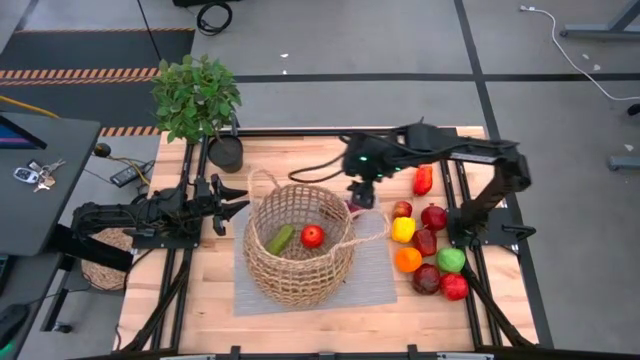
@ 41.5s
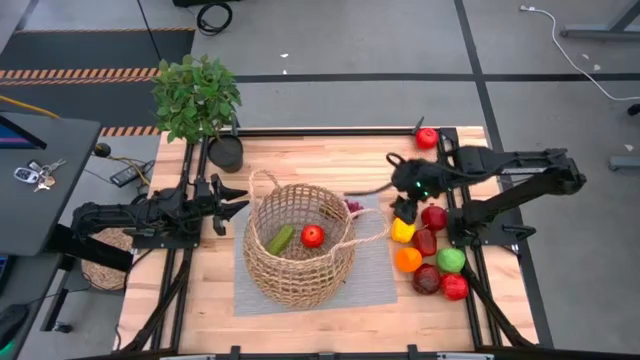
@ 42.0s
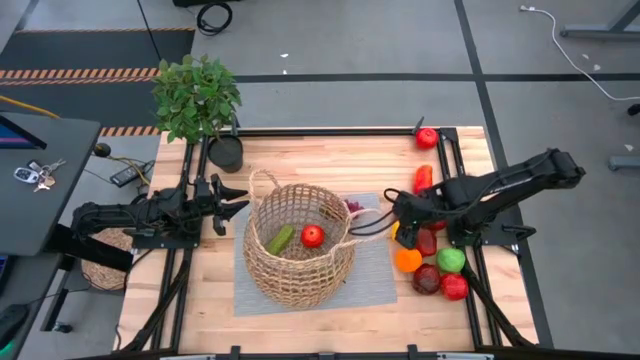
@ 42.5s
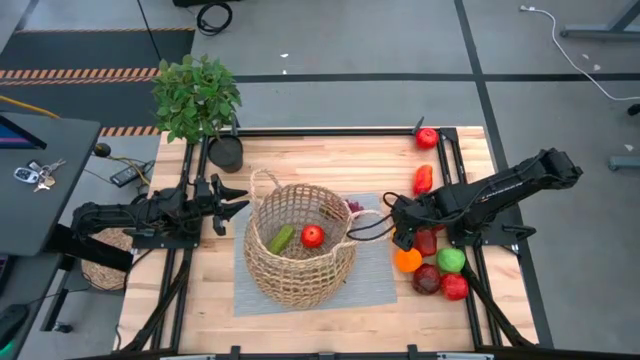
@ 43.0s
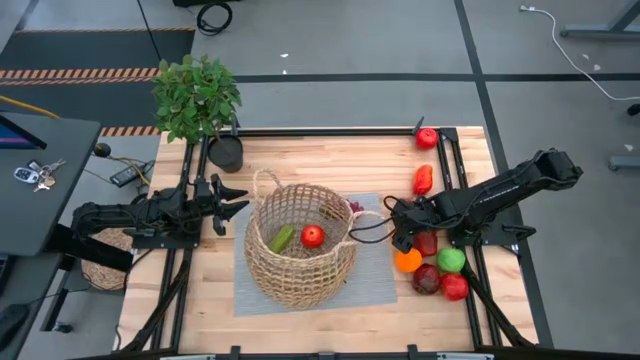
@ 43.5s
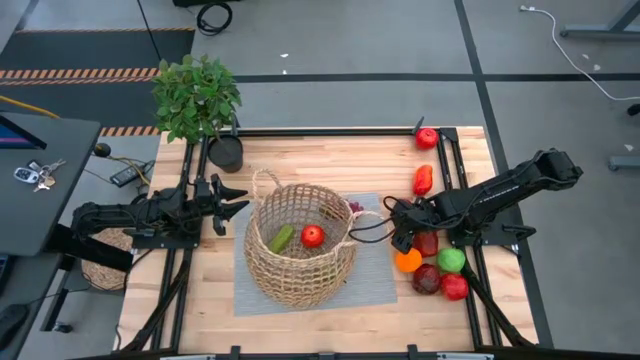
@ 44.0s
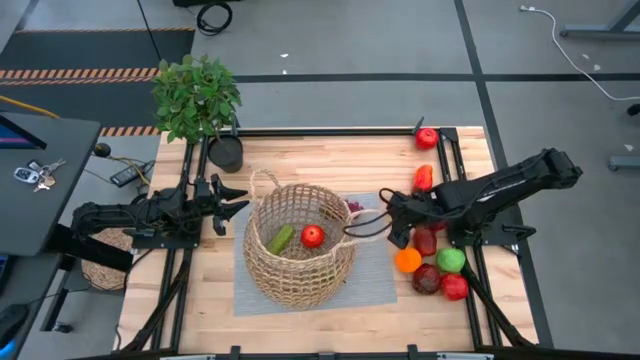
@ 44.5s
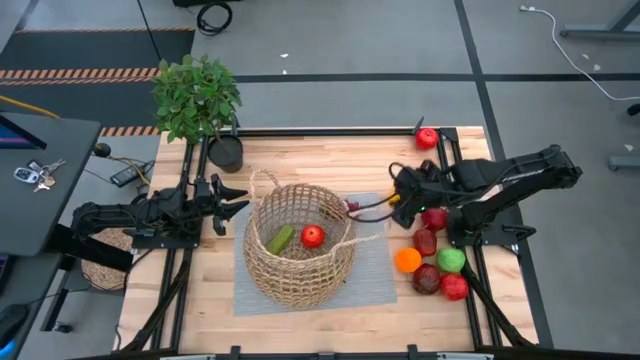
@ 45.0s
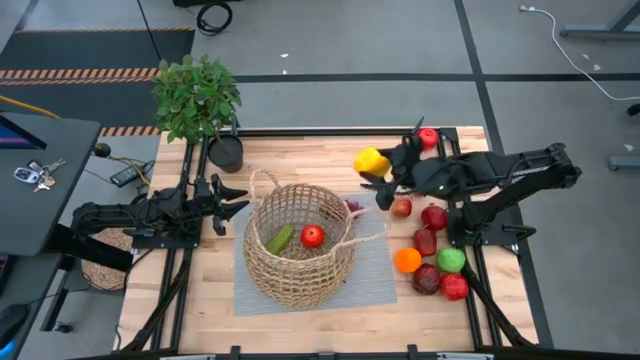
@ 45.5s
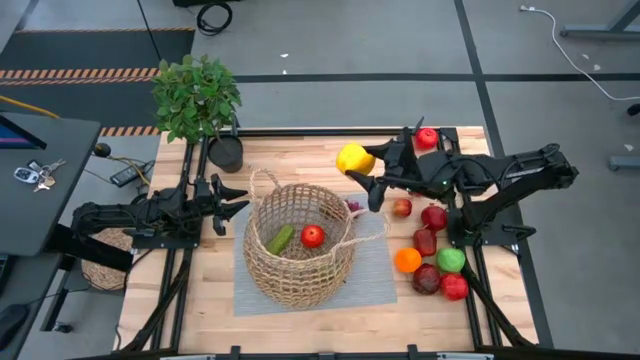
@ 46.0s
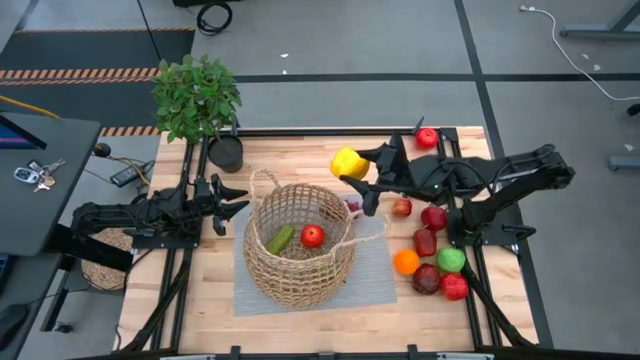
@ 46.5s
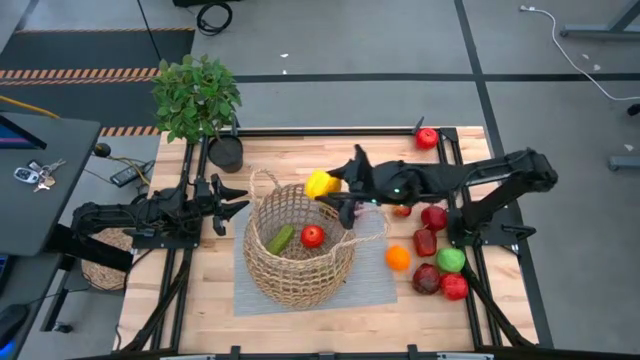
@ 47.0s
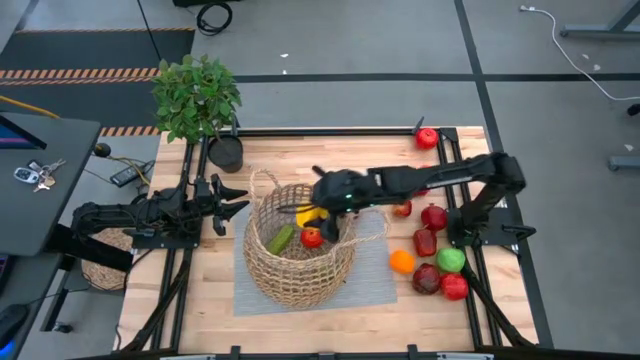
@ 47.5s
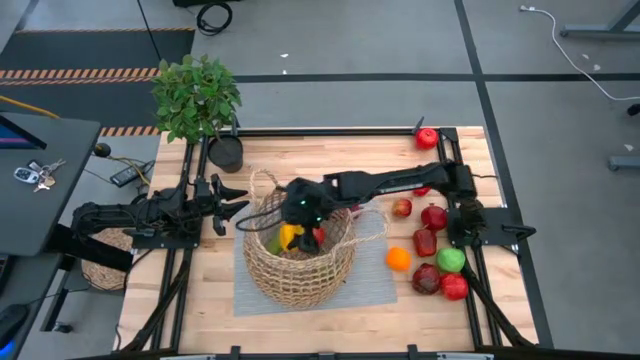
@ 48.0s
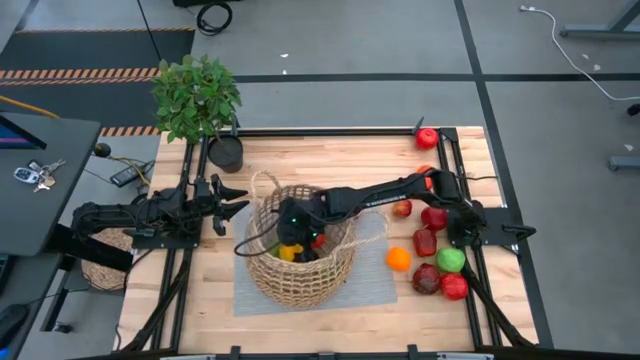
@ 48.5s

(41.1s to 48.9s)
Task: Build produce basket
Put the yellow bell pepper into the basket

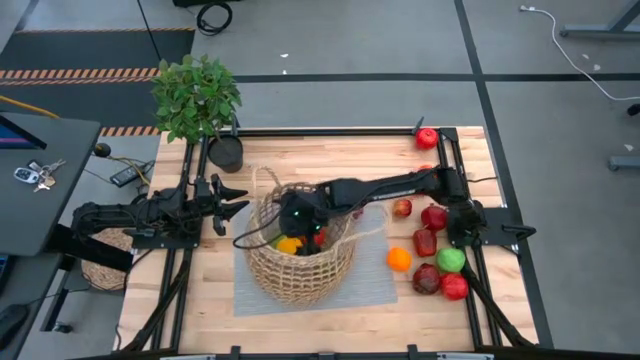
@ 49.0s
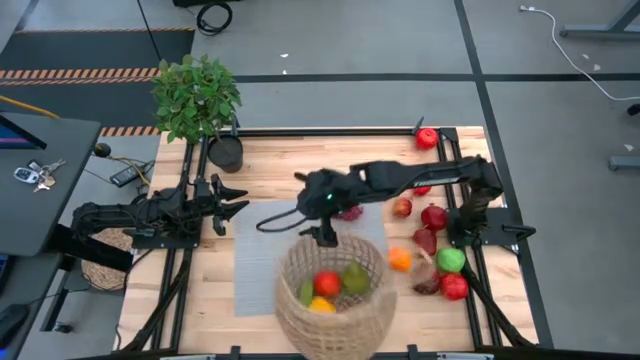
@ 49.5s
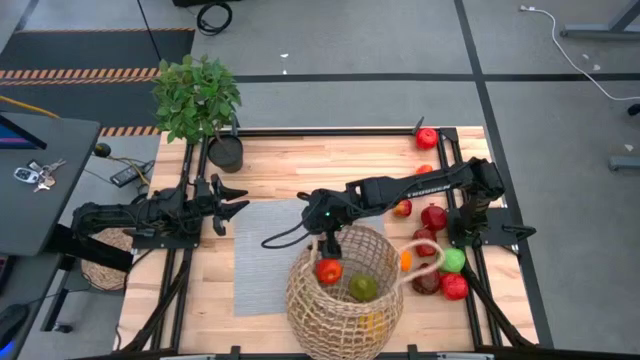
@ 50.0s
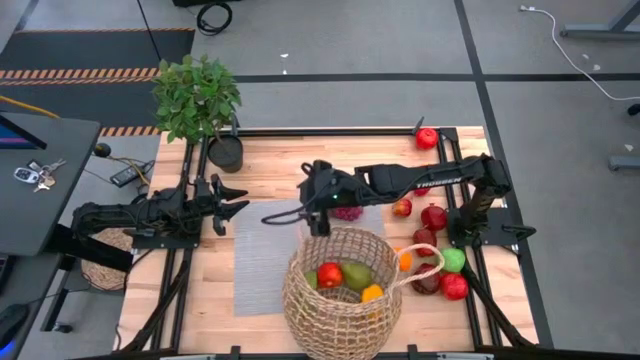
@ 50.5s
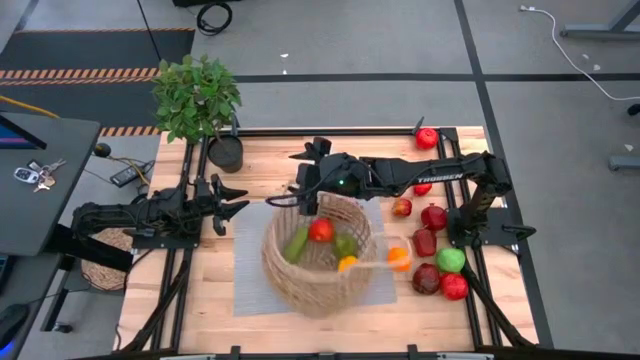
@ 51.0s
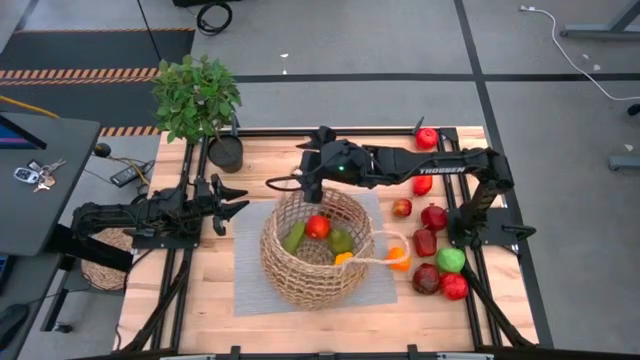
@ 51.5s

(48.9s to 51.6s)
Adjust the basket

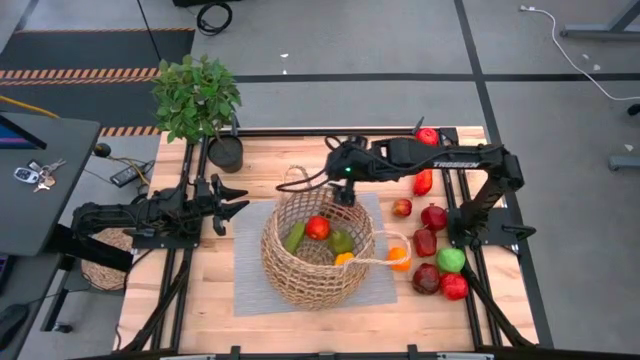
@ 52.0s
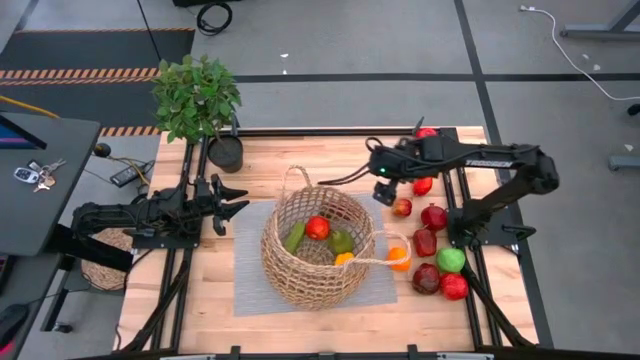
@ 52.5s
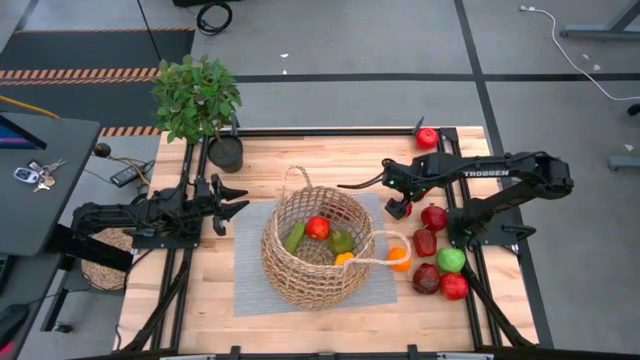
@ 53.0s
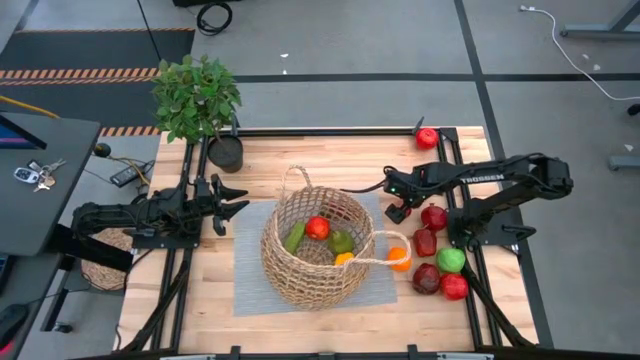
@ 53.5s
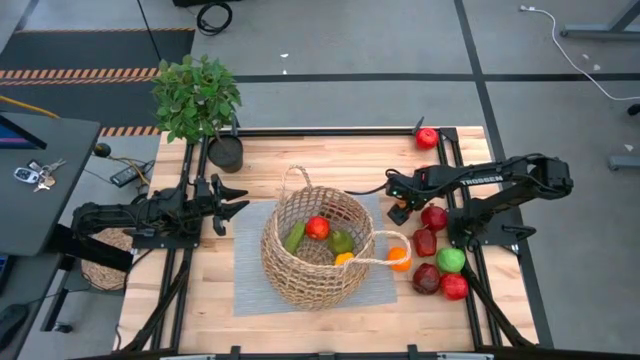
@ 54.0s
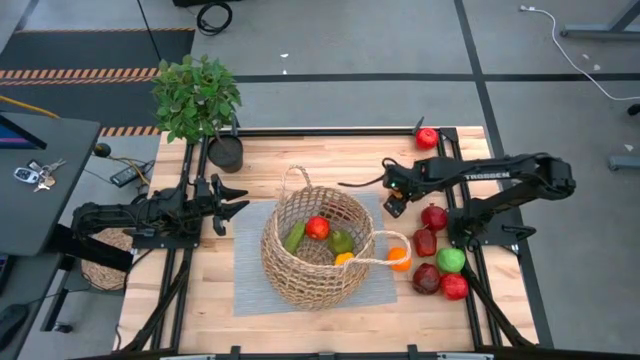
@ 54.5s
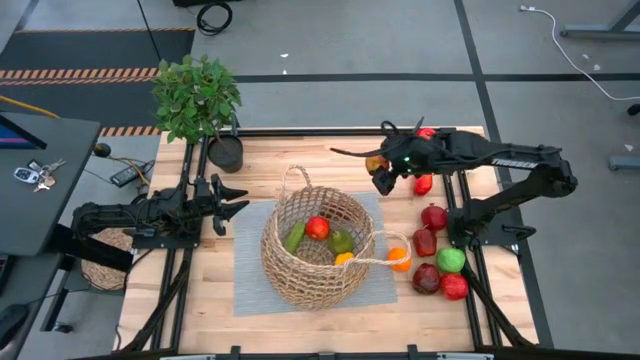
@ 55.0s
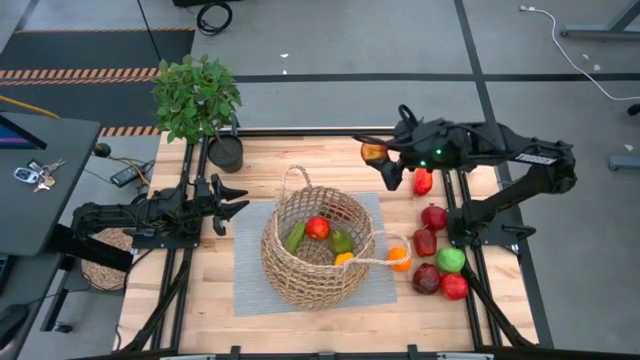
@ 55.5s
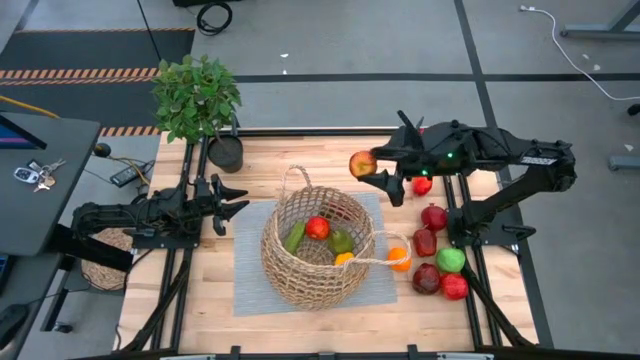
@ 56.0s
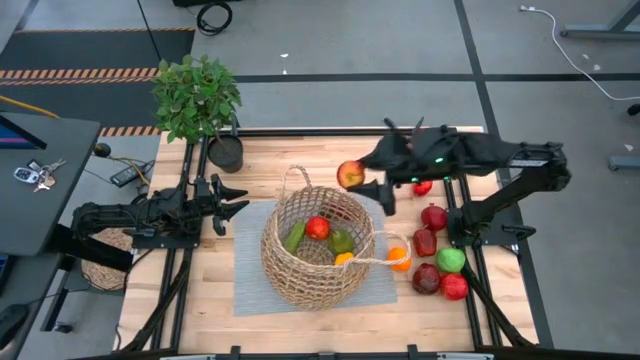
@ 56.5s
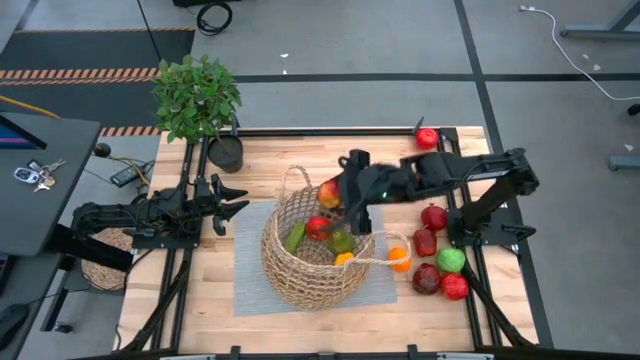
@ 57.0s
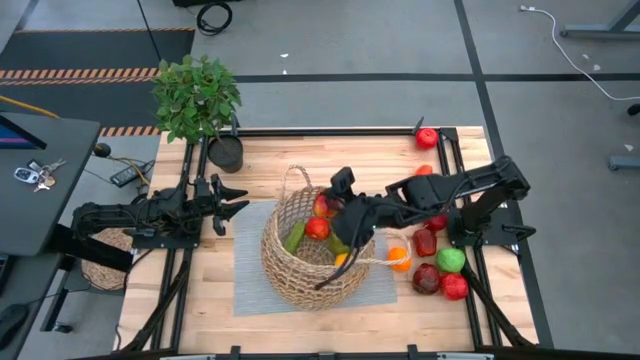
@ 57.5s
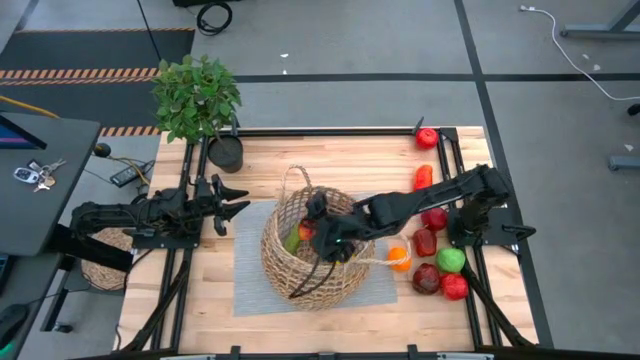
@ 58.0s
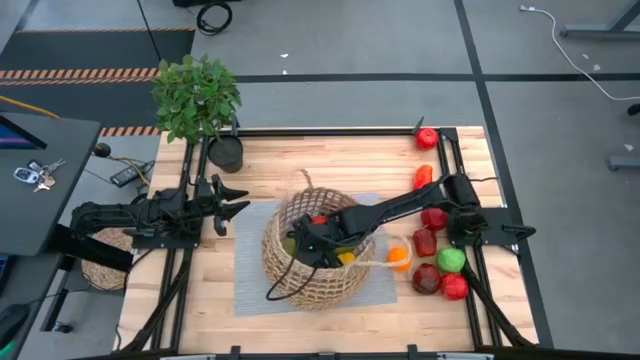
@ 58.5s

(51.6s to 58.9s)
Put the red apple into the basket

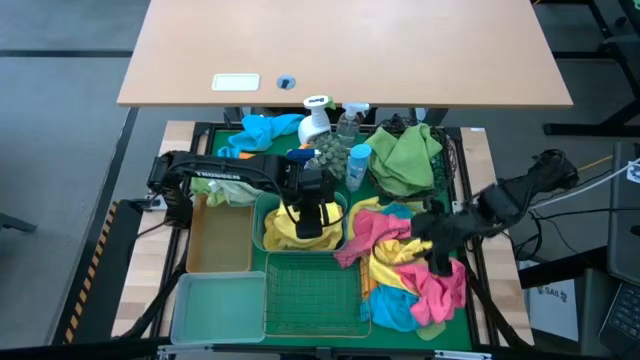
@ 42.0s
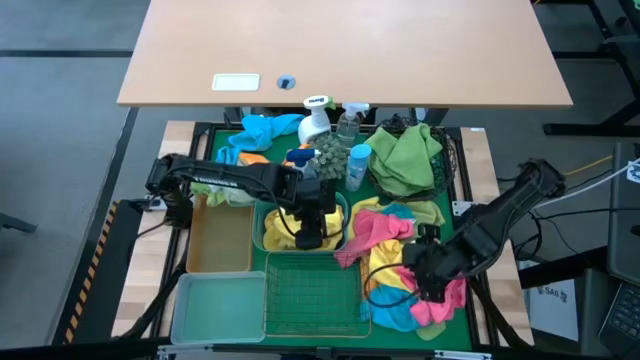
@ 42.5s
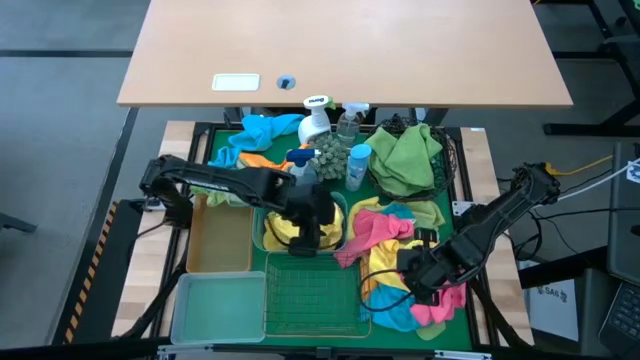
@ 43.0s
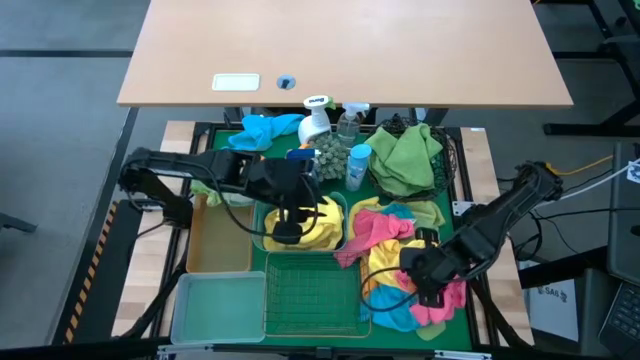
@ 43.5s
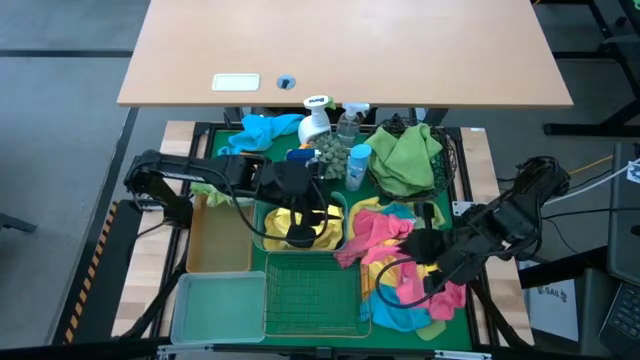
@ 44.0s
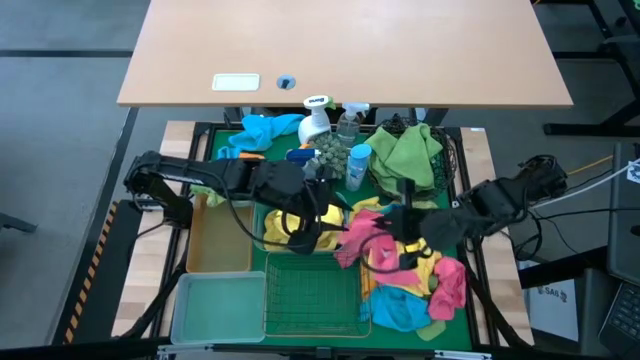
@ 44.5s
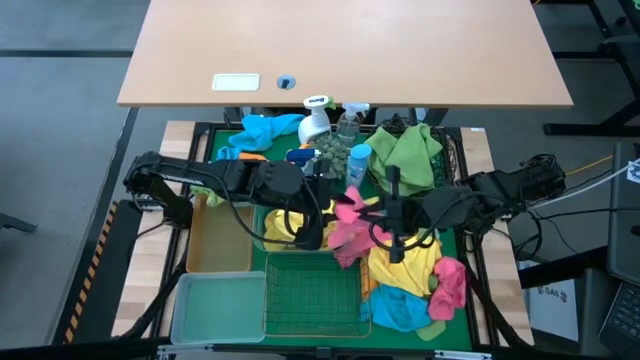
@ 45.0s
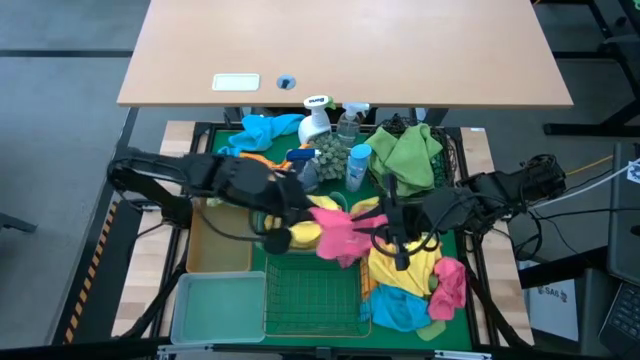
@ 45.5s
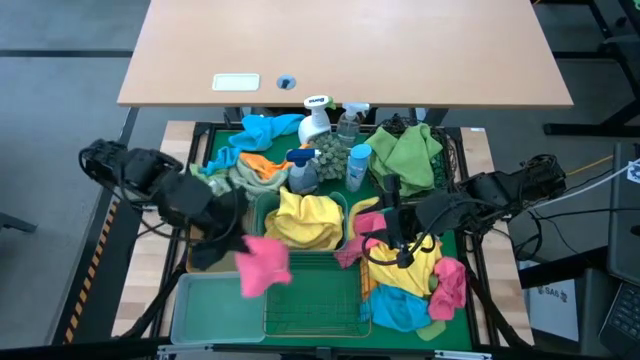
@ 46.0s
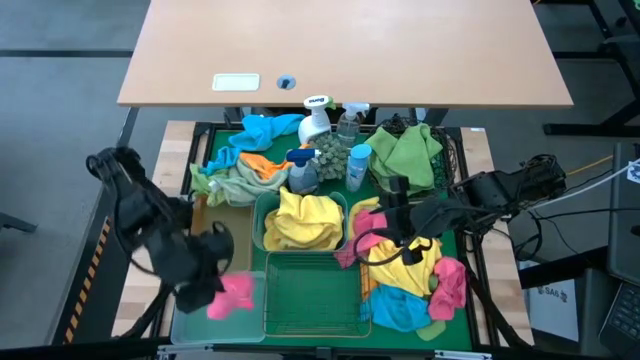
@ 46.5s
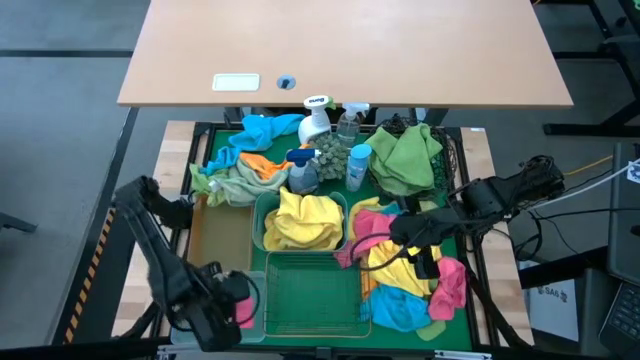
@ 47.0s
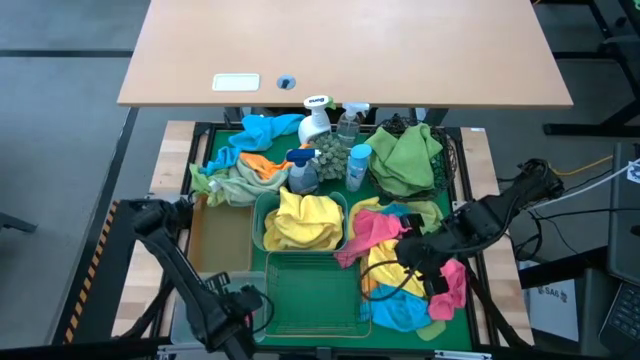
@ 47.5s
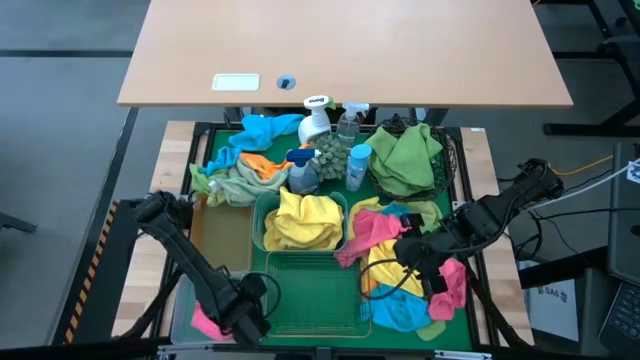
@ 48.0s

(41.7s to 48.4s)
Task: Sort microfiber towel by color & place in baskets
Put the pink microfiber towel into the transparent bin
